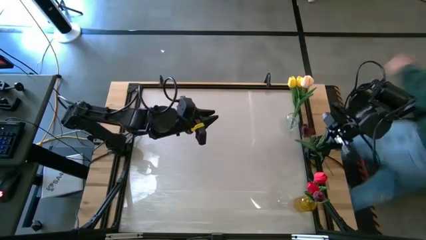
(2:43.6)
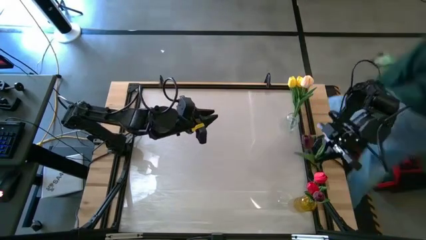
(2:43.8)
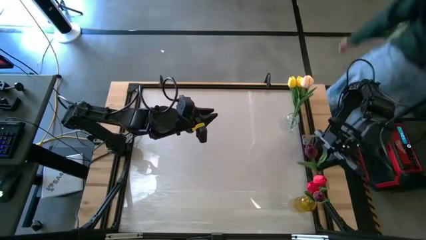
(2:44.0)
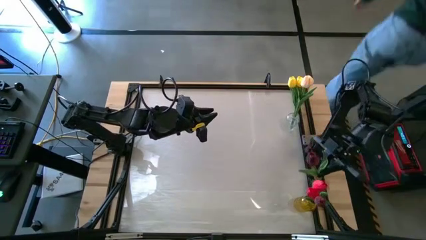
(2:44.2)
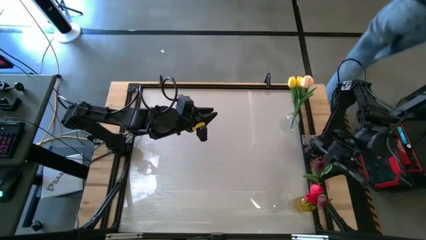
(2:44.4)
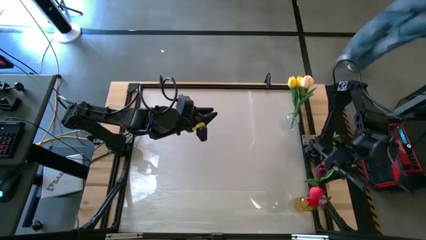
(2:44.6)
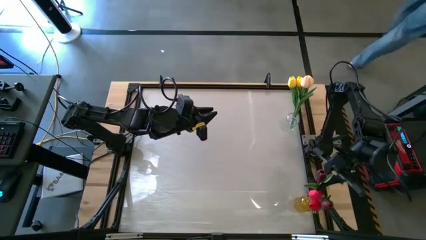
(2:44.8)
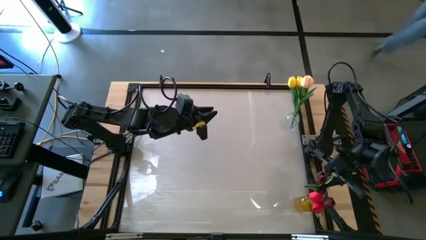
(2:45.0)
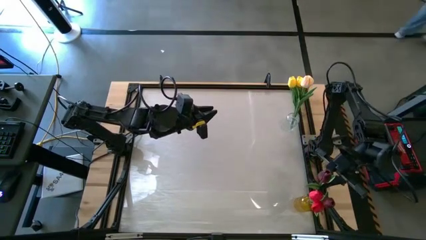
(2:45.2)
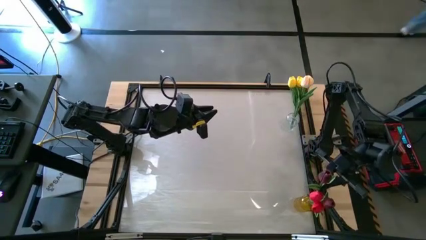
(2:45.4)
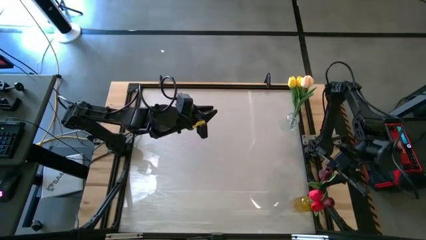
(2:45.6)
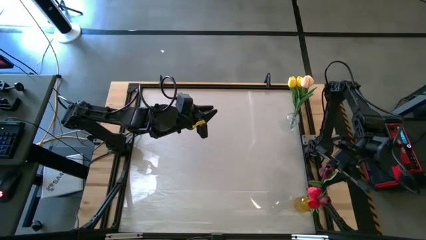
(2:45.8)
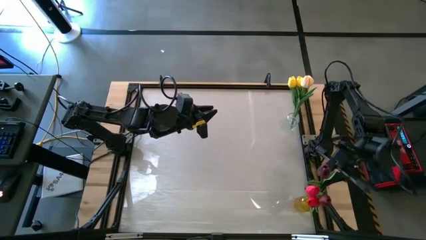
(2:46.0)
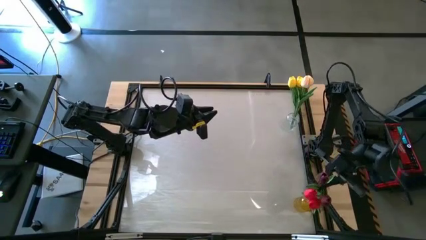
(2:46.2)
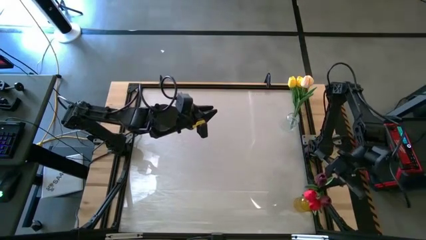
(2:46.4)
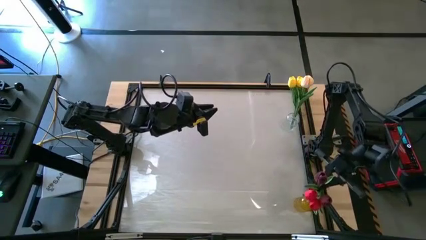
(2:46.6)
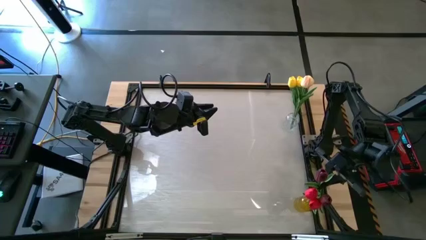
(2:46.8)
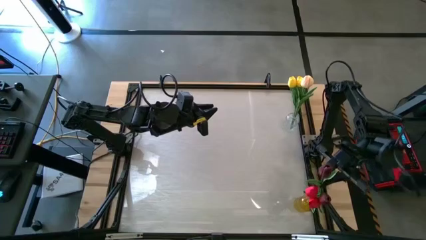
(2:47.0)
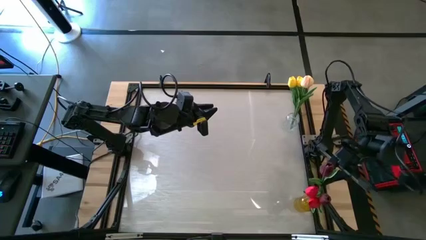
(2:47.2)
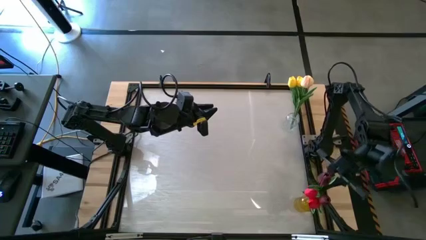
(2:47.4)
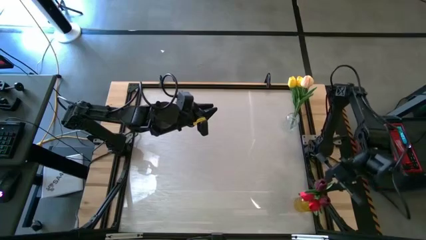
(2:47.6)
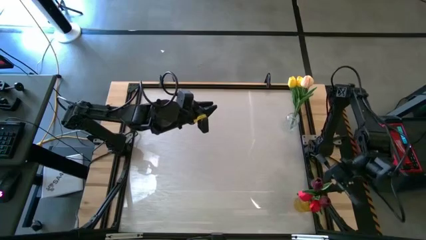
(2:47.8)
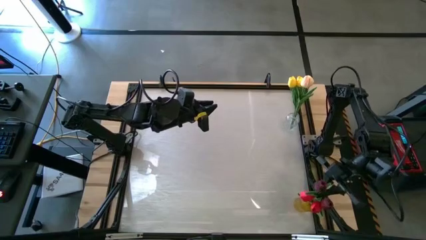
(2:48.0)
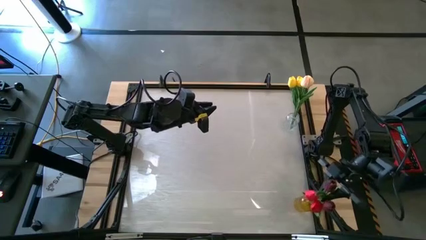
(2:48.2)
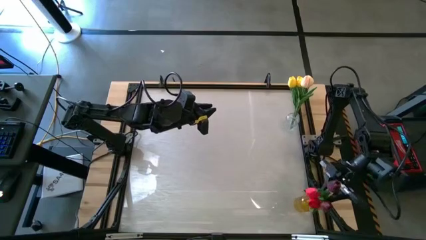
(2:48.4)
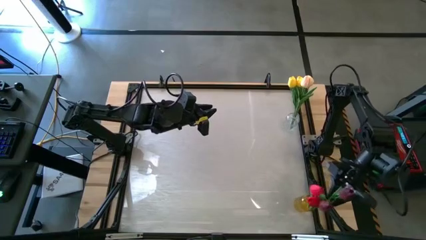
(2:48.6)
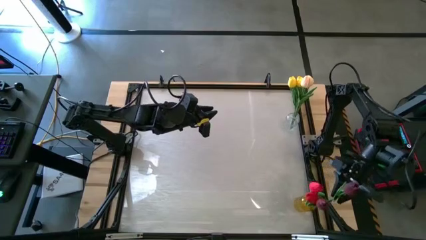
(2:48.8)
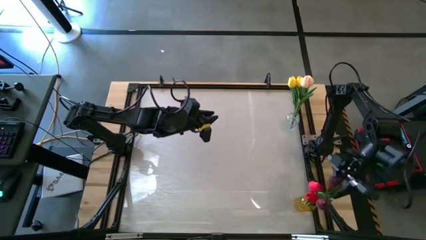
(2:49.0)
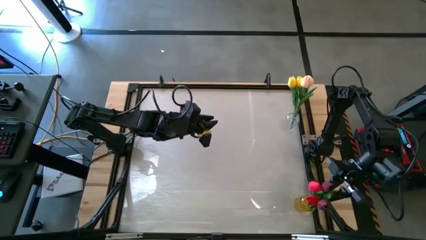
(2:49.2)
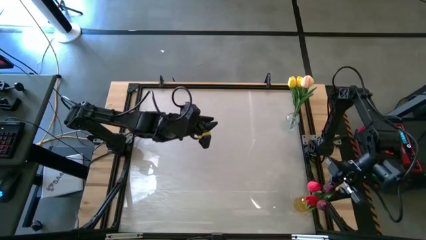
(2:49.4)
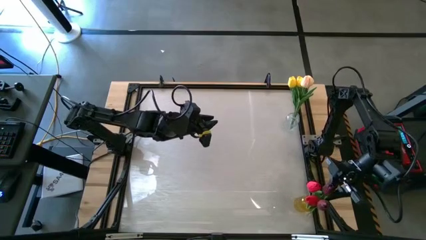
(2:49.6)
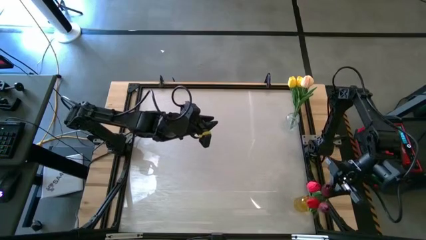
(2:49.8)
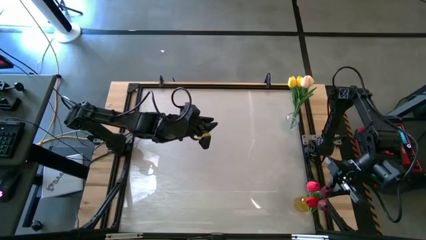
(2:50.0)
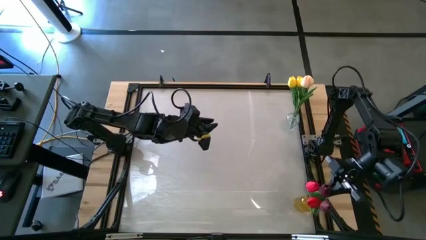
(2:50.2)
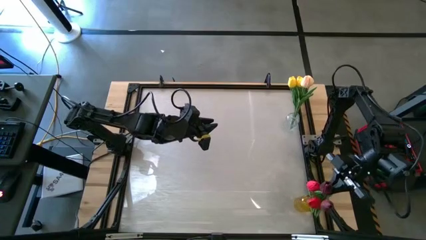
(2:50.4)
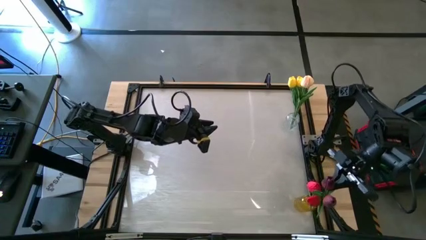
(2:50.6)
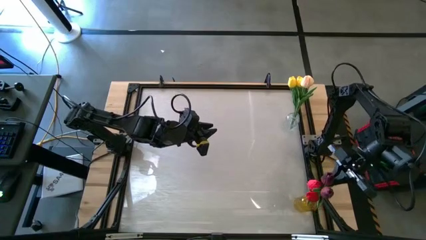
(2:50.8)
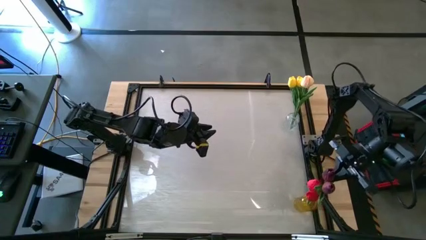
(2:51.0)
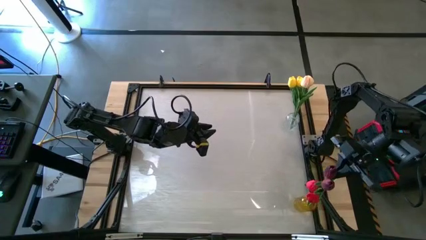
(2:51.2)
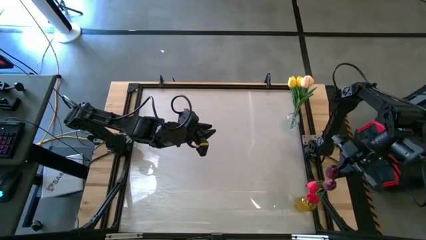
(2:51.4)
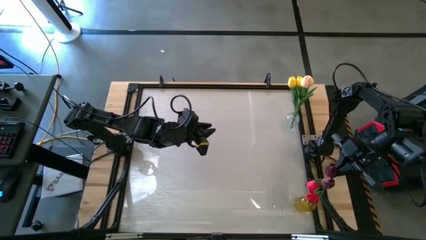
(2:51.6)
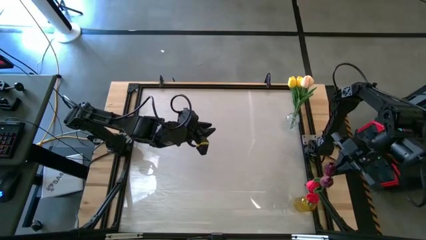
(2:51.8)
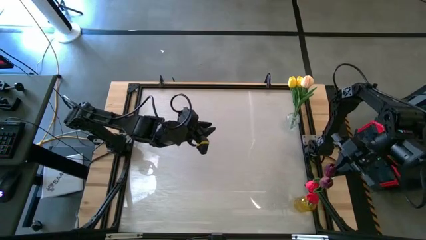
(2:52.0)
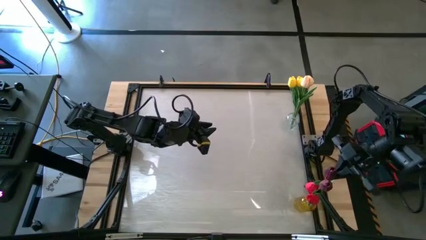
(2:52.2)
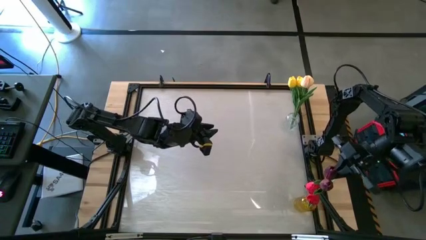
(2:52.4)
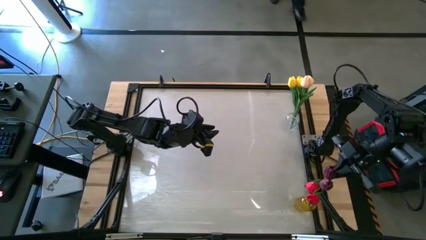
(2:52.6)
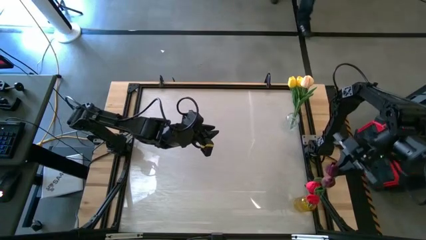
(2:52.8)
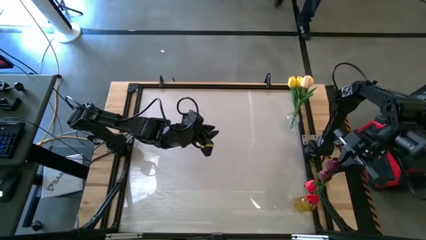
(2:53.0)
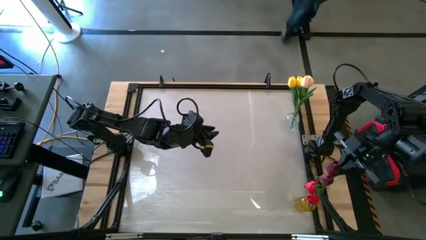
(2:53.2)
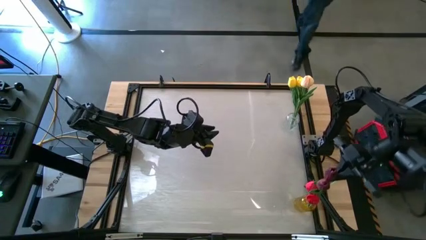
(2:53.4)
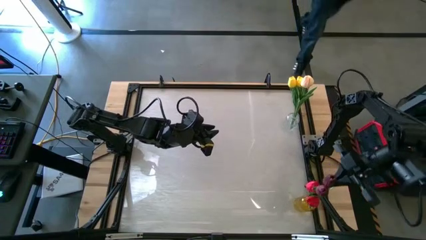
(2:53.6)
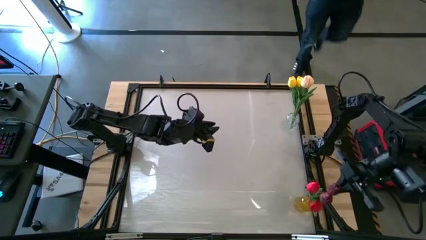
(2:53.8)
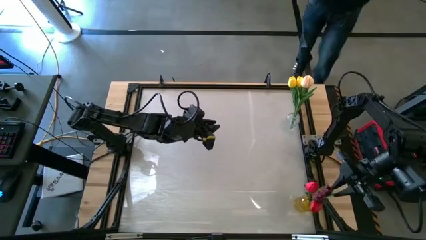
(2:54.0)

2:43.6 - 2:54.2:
Task: Sort flowers into vase by color
Put the dark red tulip into the yellow vase
